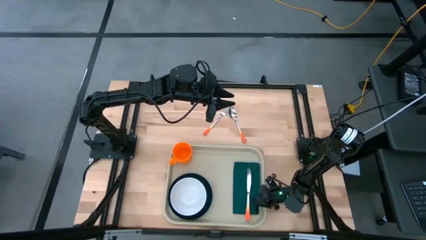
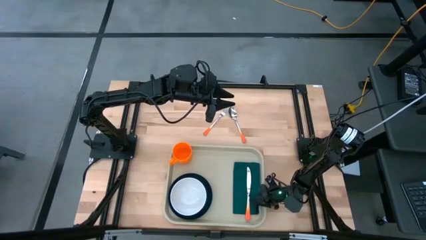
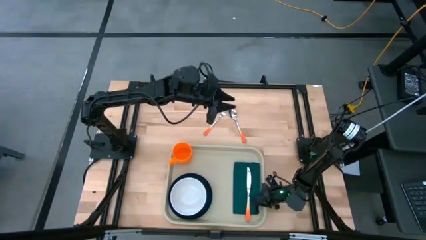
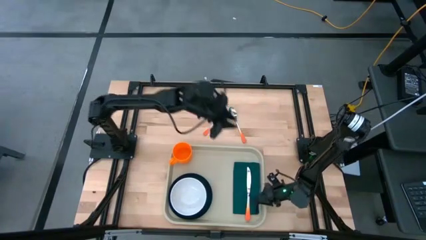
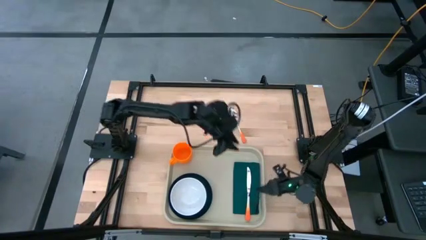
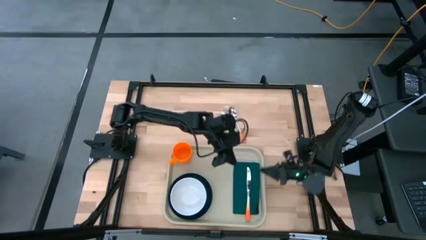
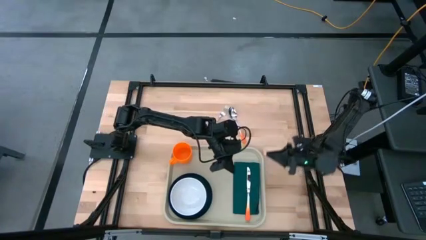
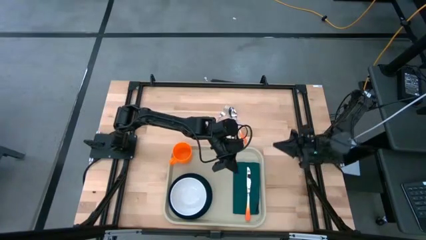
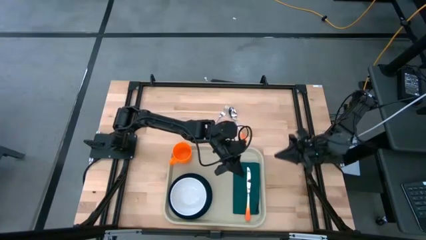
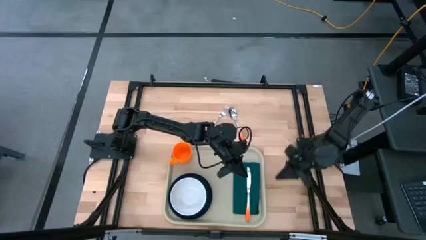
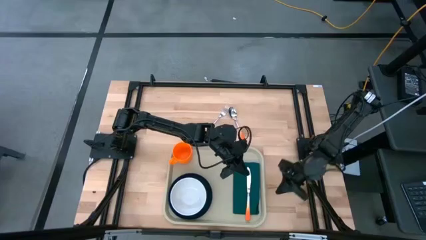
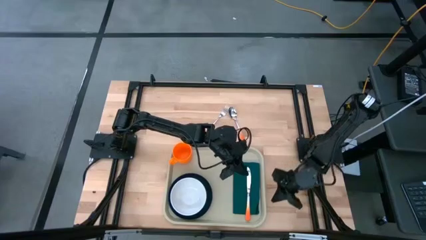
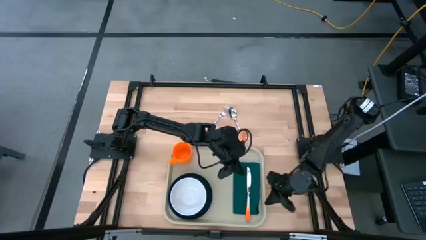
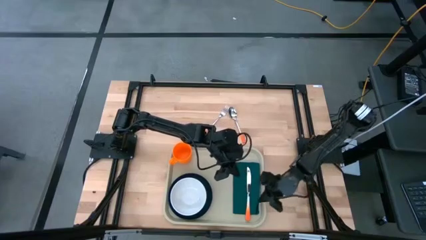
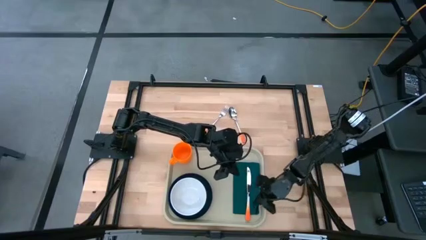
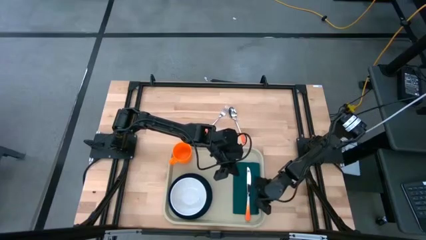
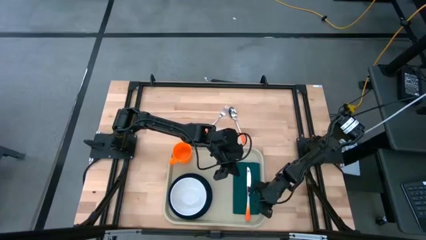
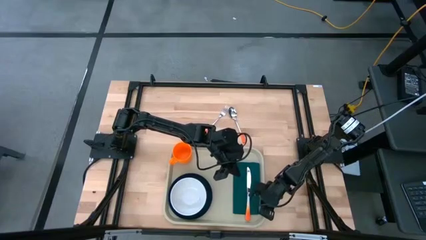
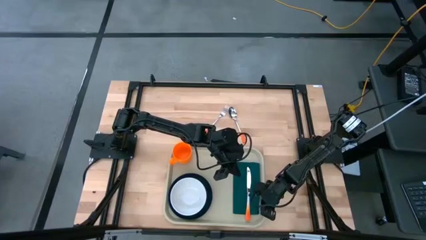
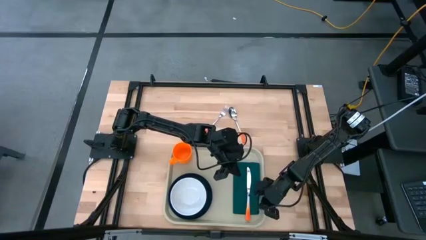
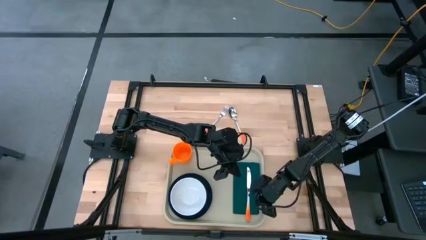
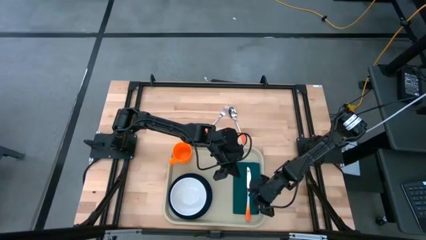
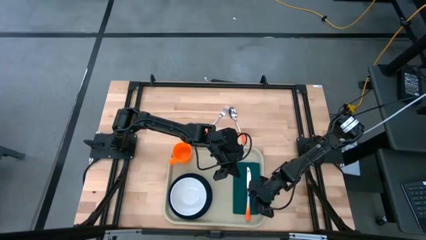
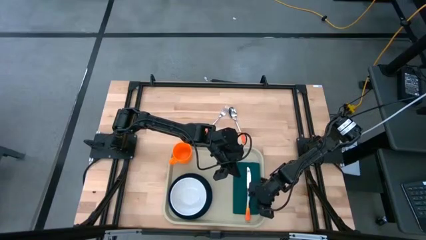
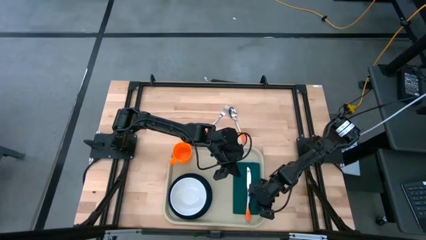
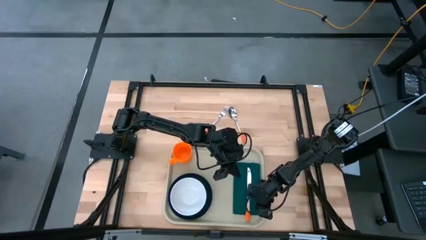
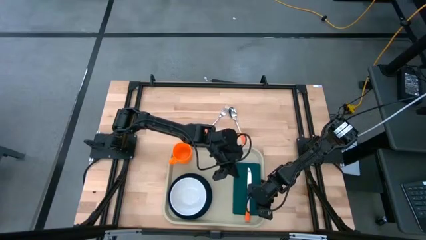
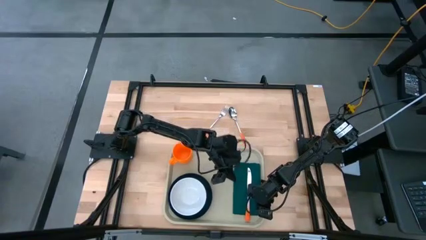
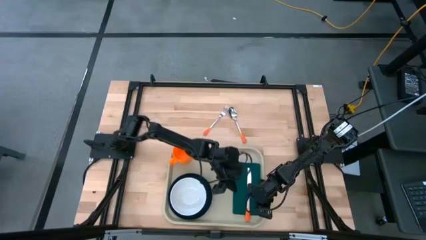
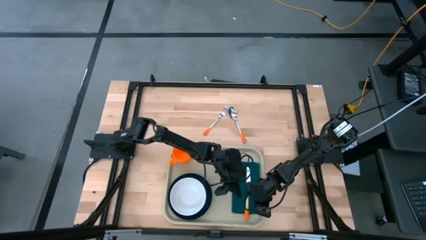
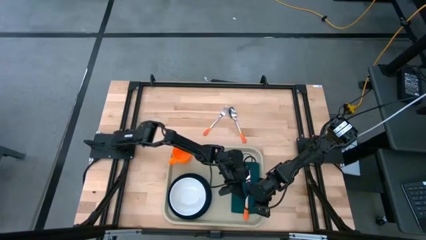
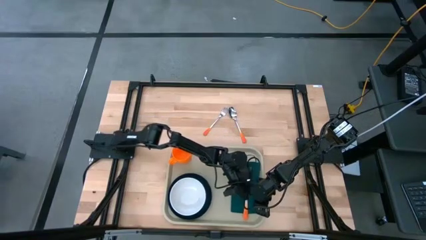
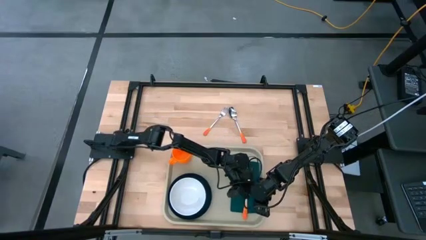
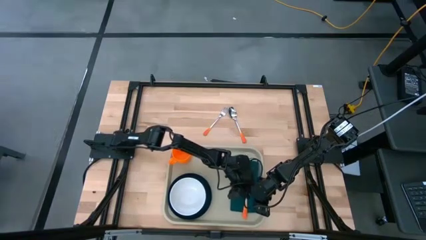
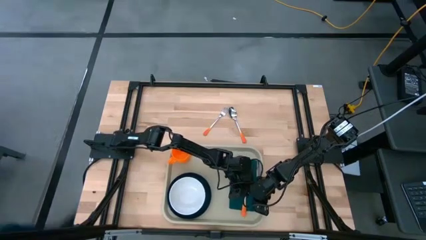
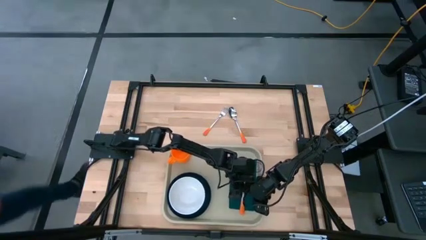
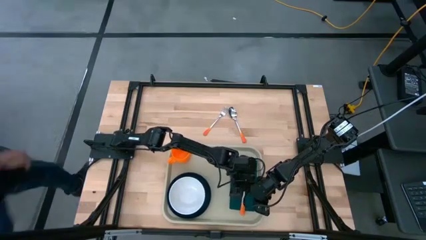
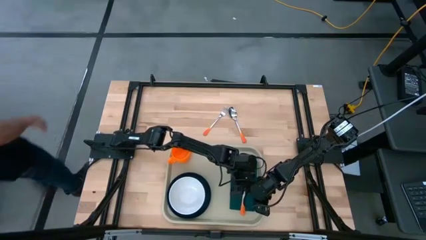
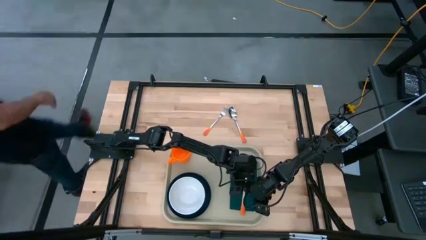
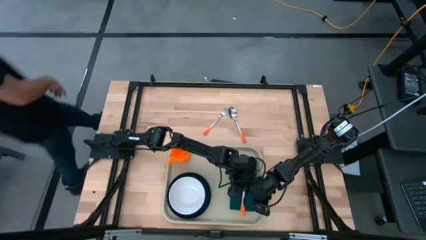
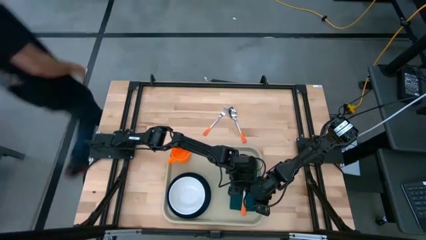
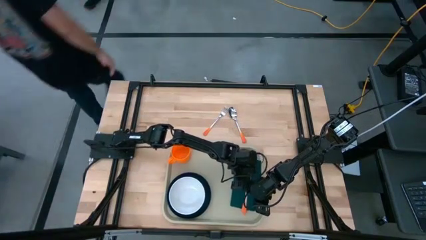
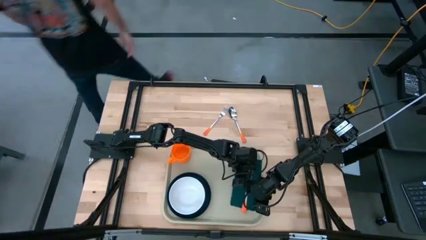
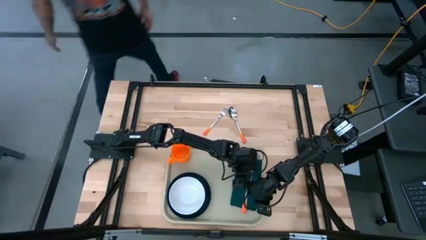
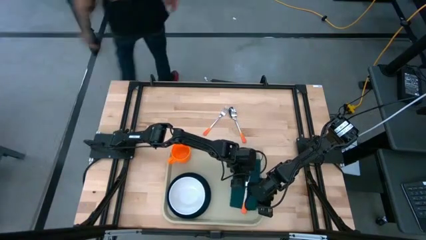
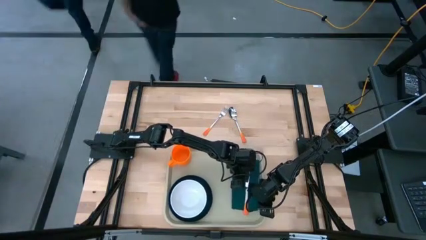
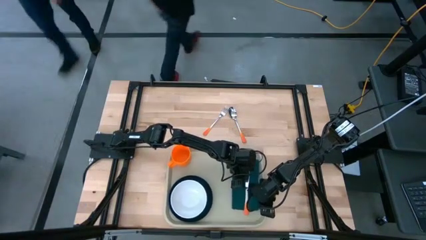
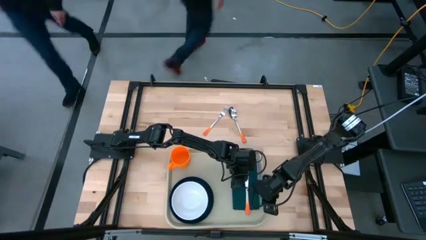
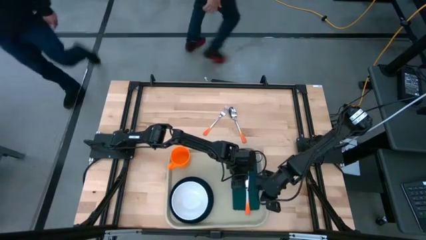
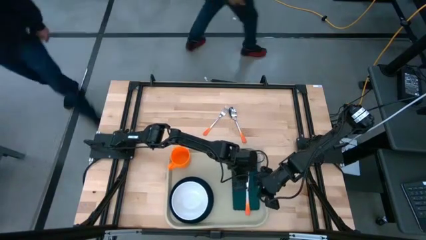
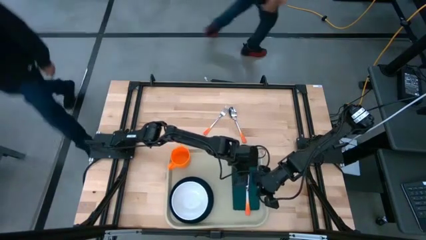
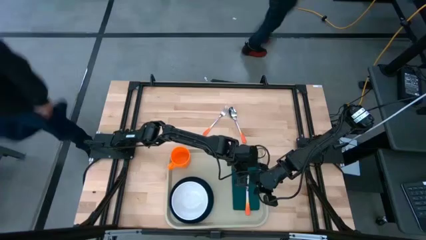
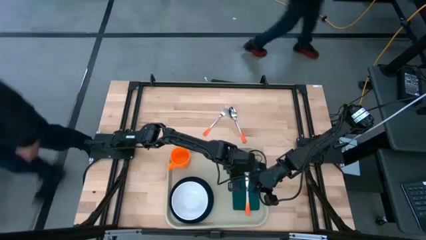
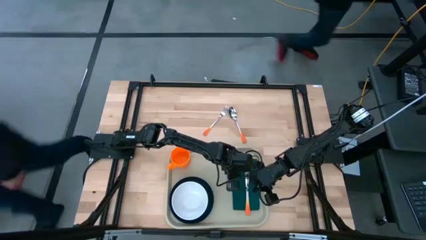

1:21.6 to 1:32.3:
Task: Set up tray
Adjust the green napkin on the brown serving tray
